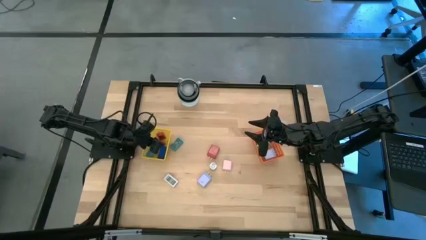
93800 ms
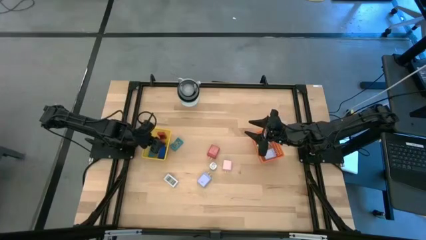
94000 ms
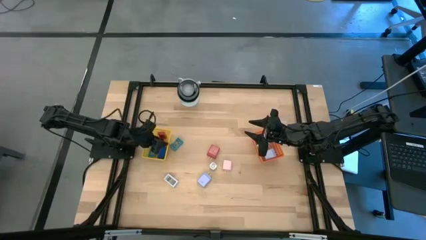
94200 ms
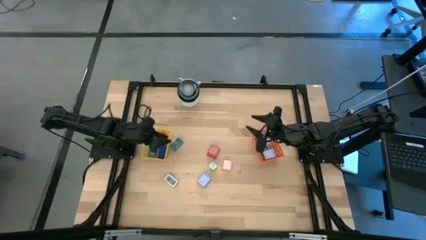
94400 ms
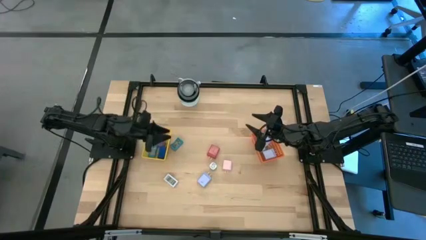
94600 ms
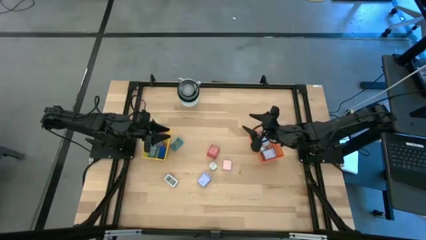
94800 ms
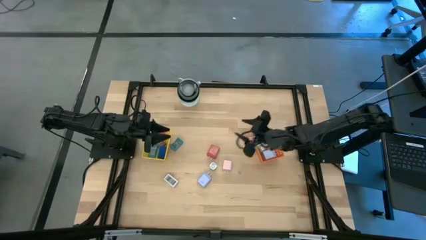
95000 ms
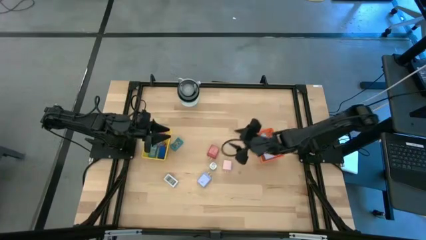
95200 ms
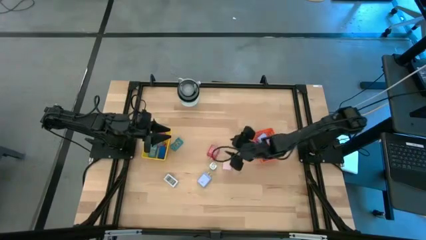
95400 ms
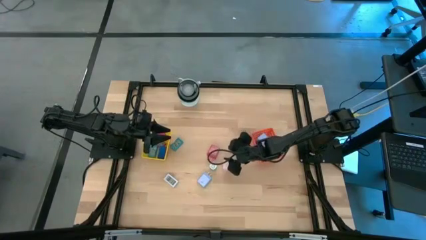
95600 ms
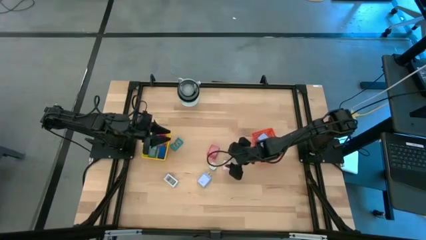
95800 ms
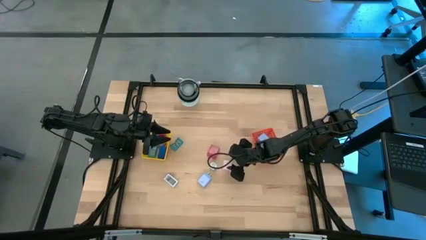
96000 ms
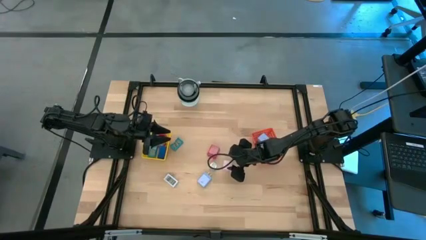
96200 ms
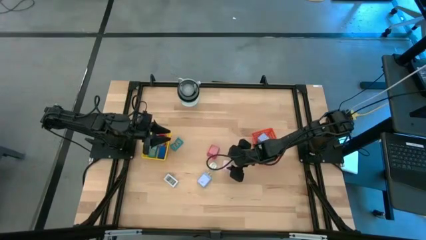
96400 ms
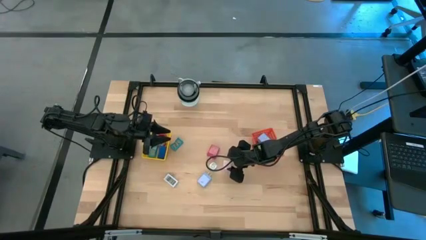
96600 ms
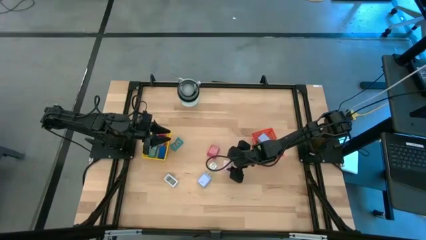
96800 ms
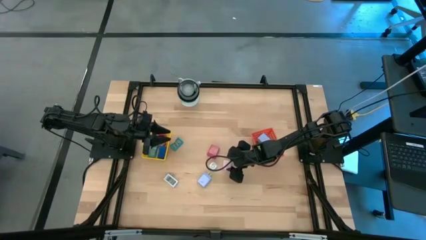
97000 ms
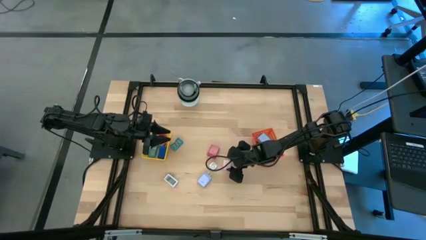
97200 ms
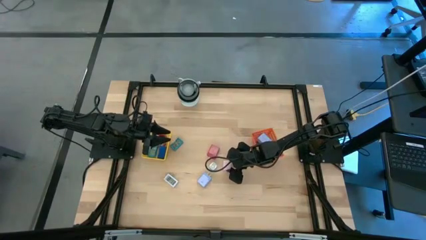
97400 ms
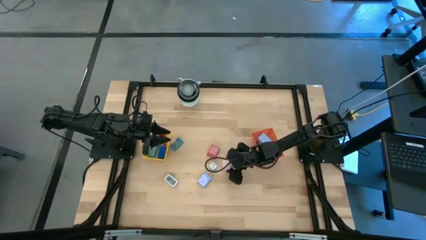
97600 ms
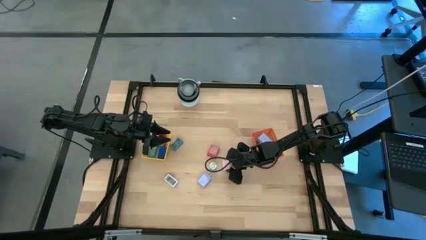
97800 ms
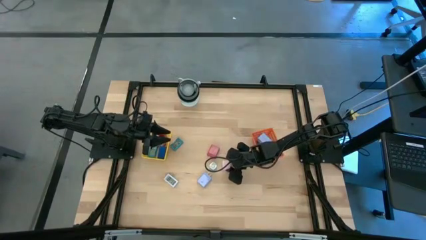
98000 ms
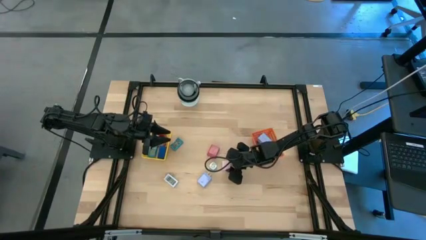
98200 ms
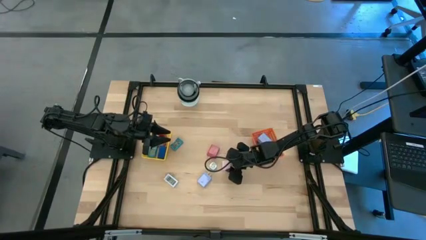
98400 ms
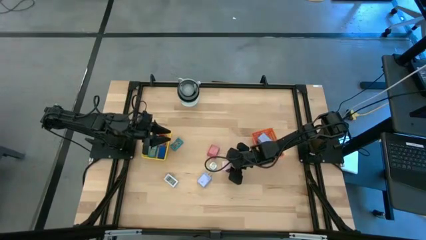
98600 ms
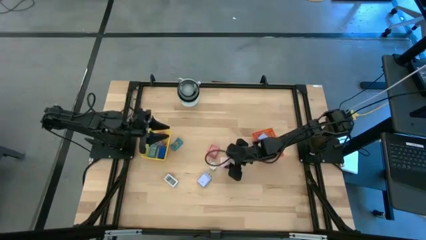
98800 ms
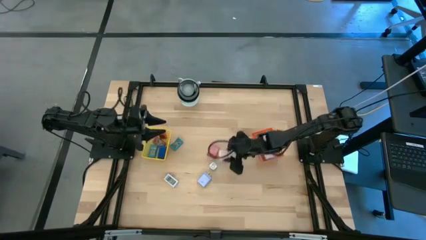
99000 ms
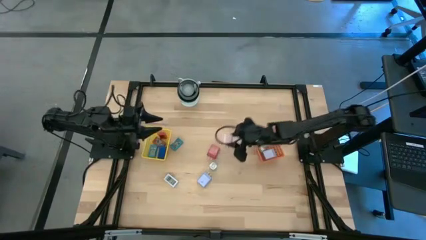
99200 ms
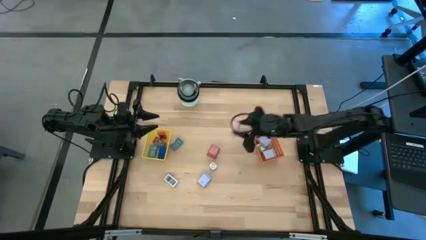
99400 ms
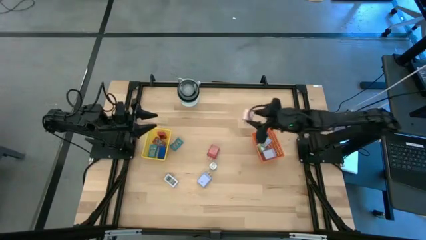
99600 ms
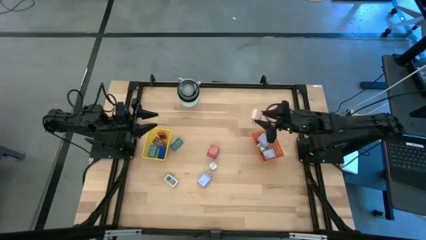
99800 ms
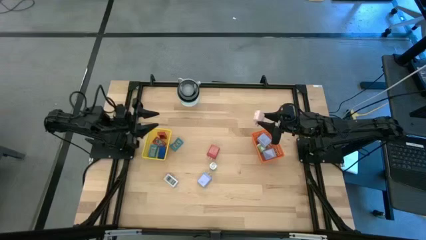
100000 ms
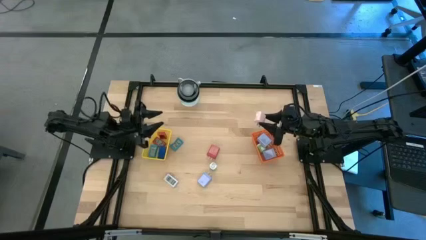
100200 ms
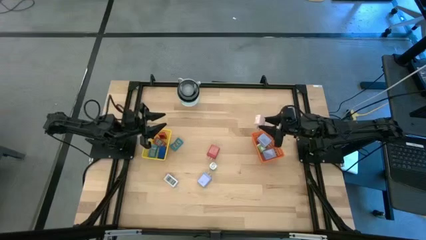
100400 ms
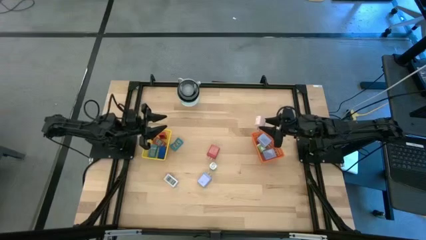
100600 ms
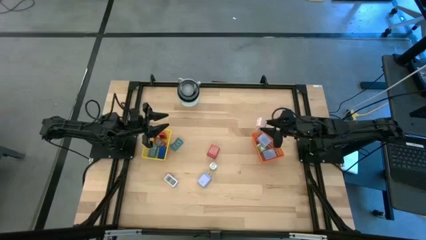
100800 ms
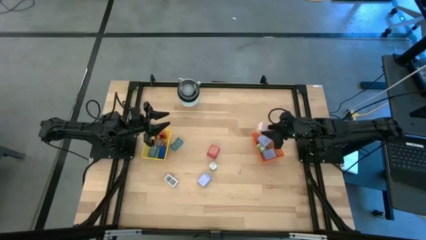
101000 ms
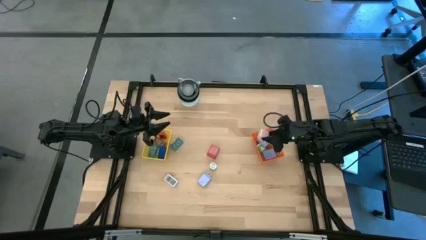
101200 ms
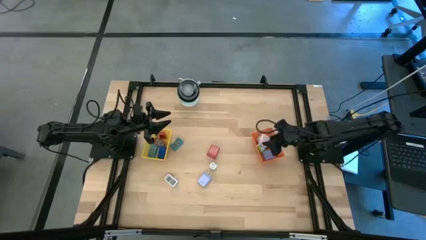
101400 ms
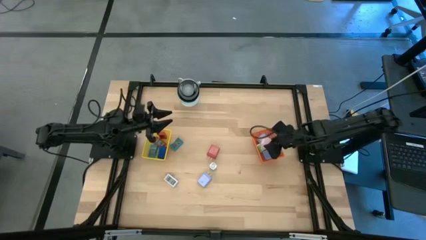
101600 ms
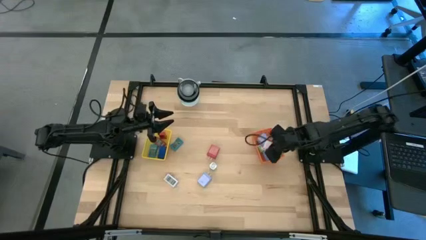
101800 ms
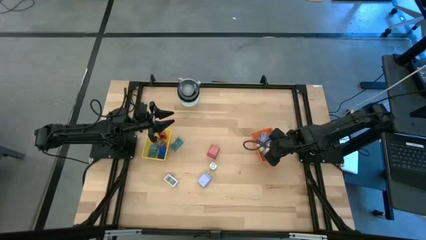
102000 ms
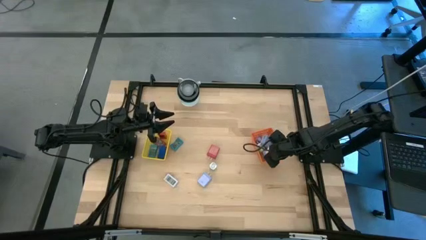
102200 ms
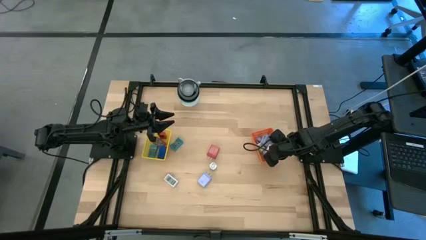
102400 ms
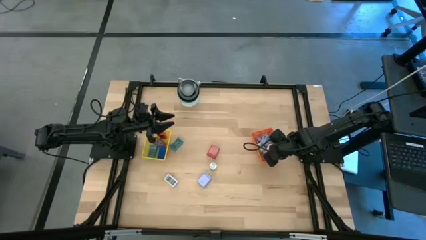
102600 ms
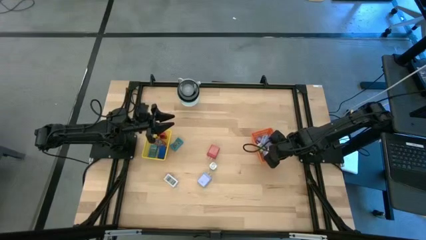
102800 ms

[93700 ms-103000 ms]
Task: Pick & Place Office items
Put the white charger adapter into the orange basket

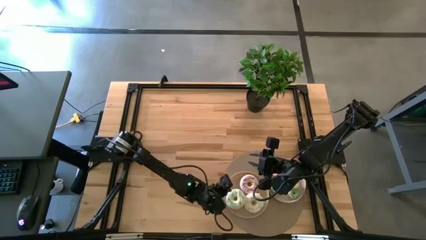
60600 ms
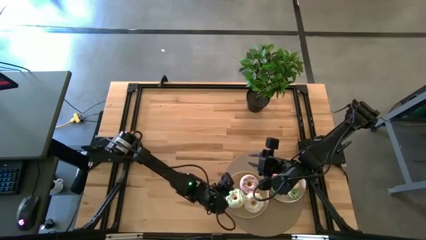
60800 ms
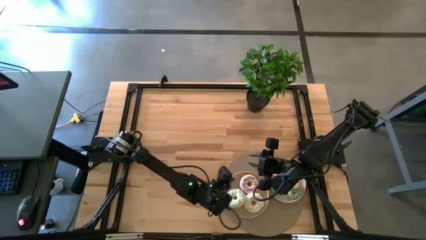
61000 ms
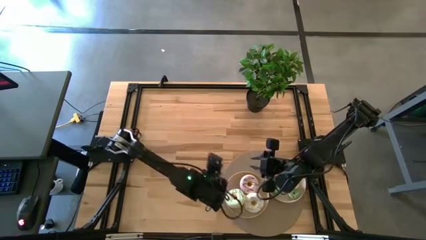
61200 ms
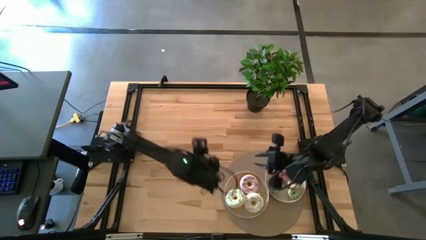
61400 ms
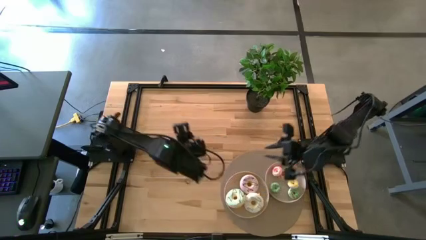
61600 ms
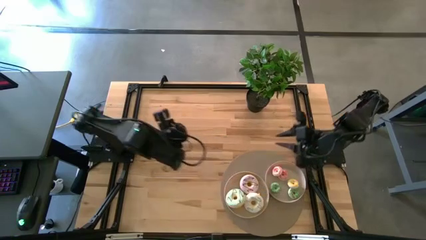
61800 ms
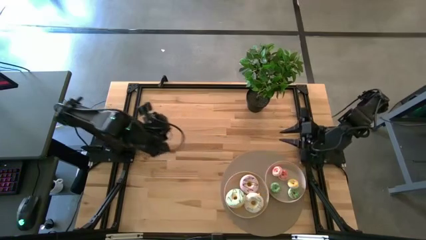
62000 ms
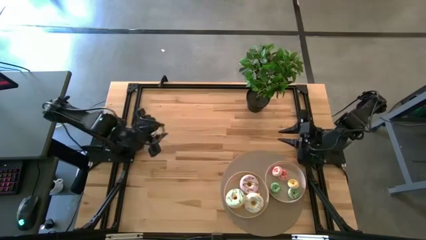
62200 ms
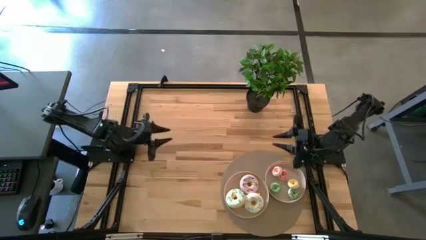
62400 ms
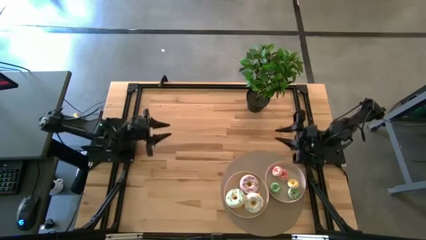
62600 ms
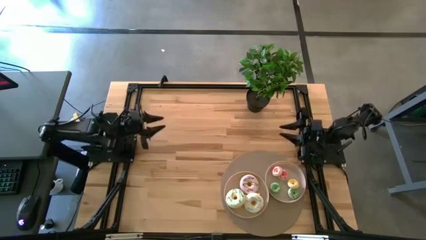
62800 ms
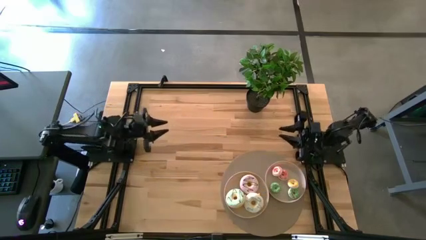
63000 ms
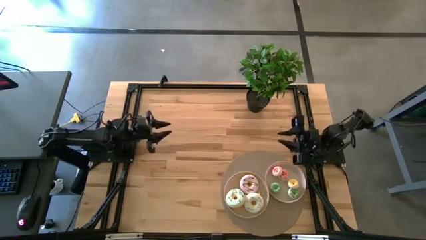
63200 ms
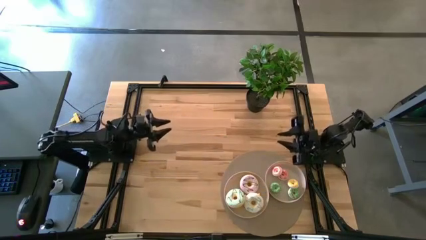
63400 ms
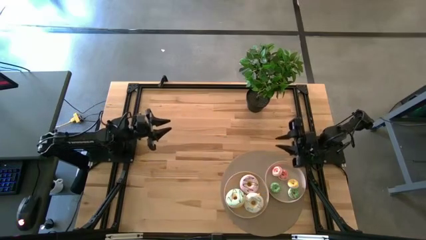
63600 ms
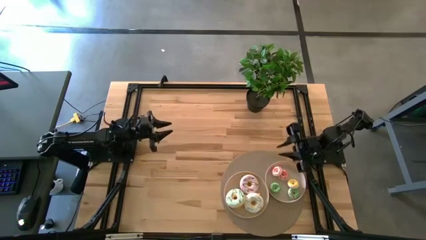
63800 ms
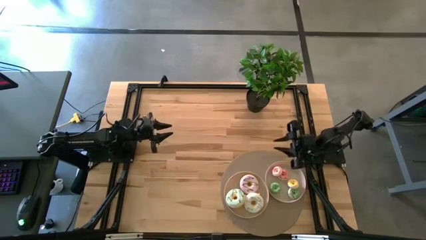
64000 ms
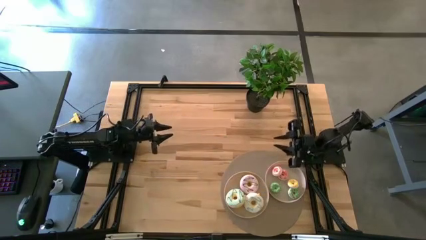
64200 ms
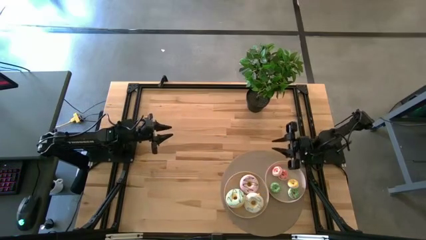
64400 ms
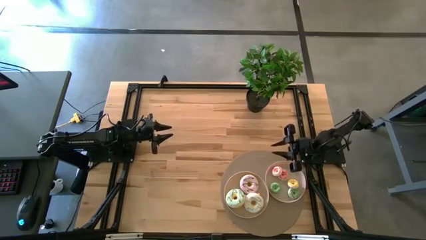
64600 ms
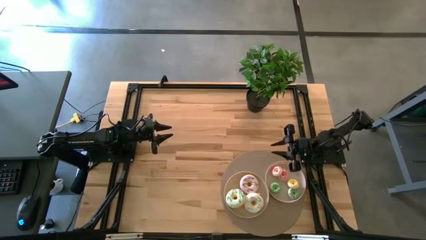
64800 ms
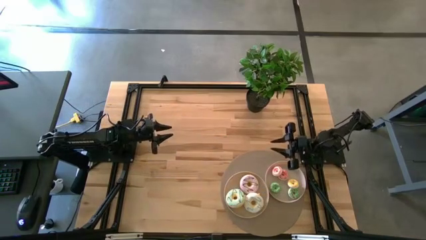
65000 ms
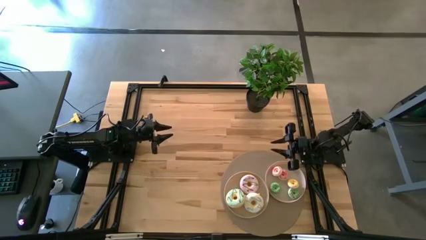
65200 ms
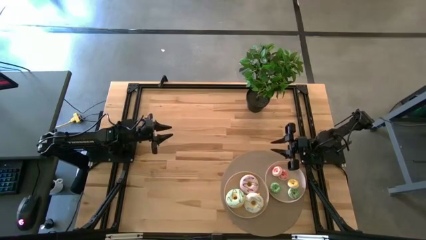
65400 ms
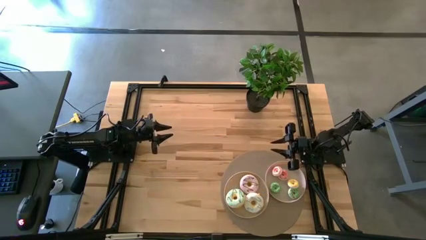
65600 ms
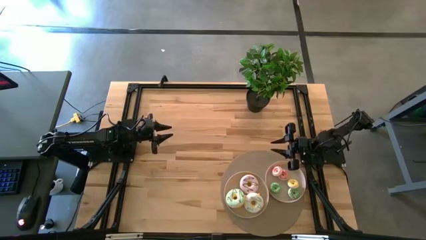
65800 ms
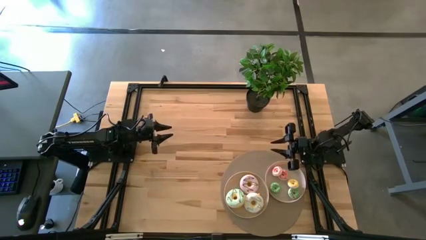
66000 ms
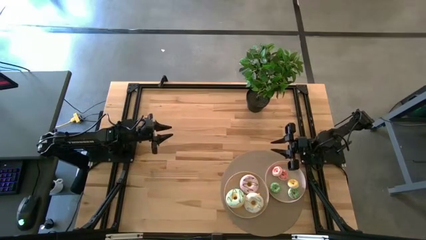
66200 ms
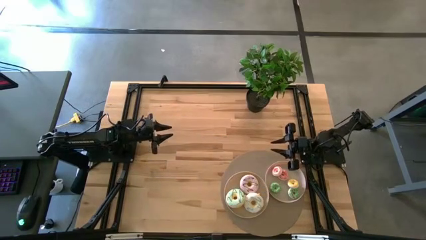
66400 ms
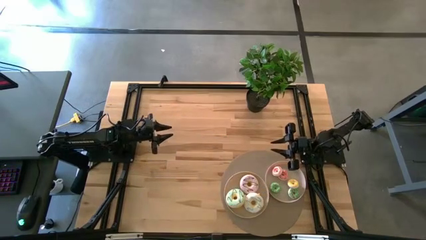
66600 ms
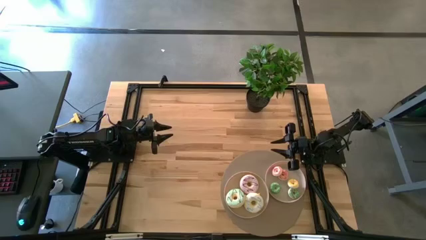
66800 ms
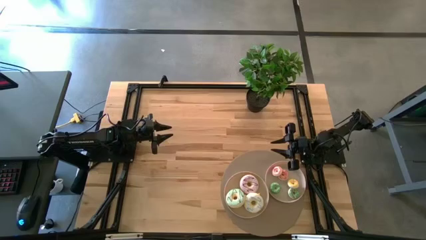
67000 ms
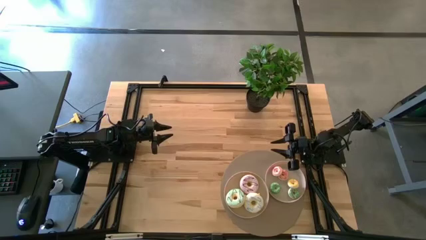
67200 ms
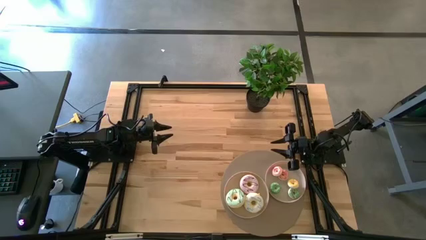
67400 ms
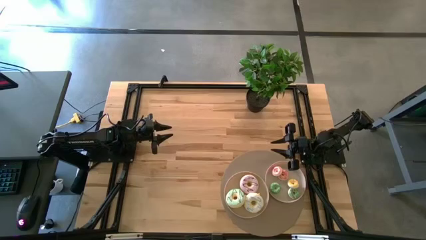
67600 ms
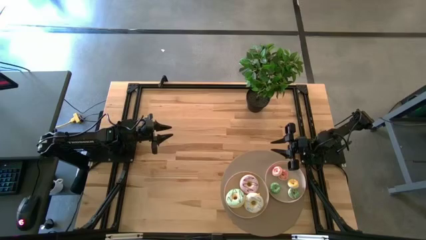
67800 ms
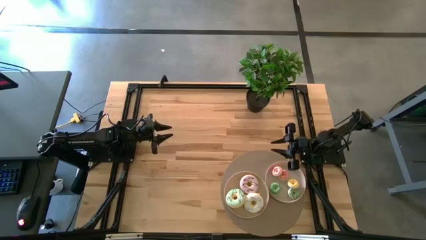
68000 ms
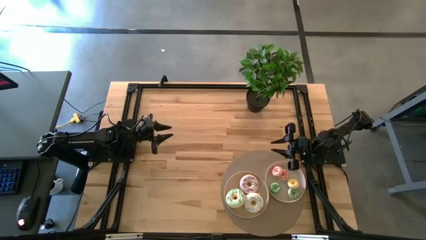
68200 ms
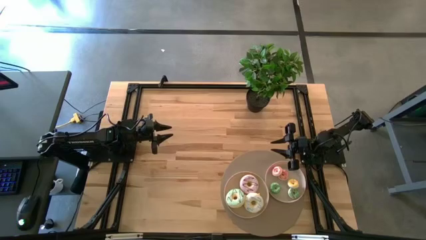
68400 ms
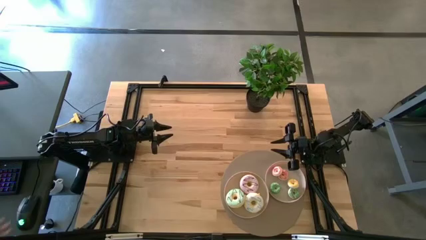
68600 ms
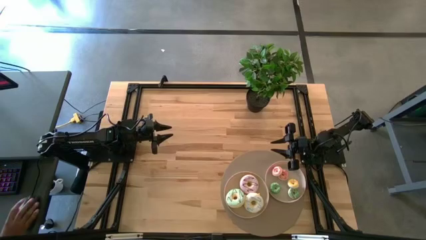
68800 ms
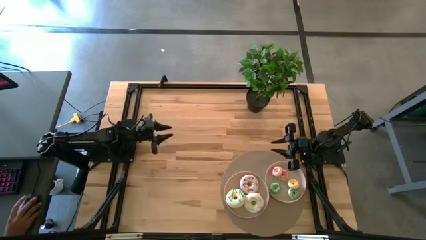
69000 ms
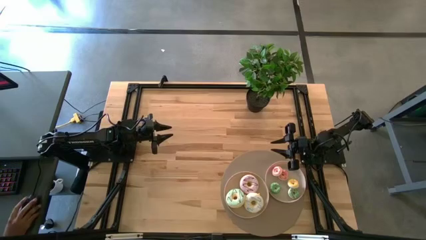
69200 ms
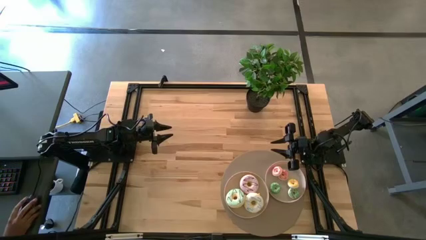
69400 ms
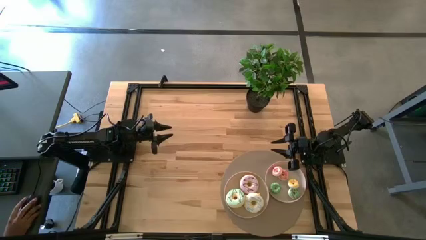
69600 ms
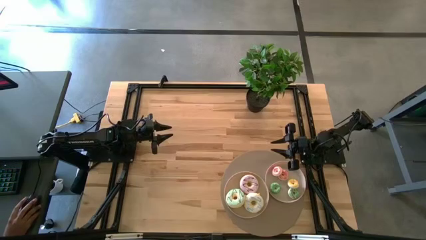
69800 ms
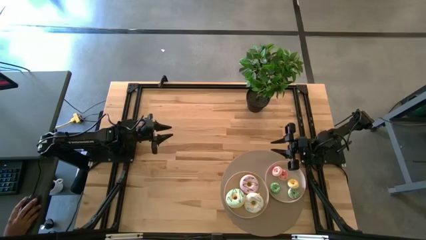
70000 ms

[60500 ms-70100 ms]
Task: Pick & Place donuts
Return to Home Position
